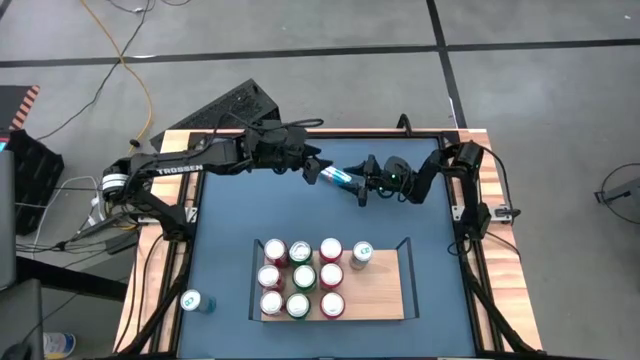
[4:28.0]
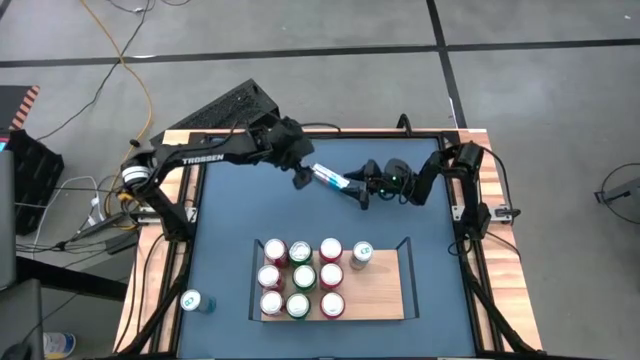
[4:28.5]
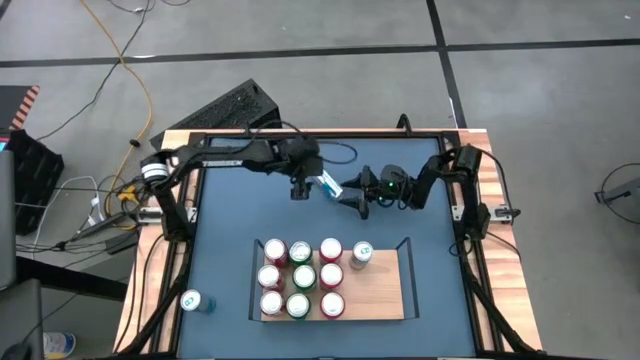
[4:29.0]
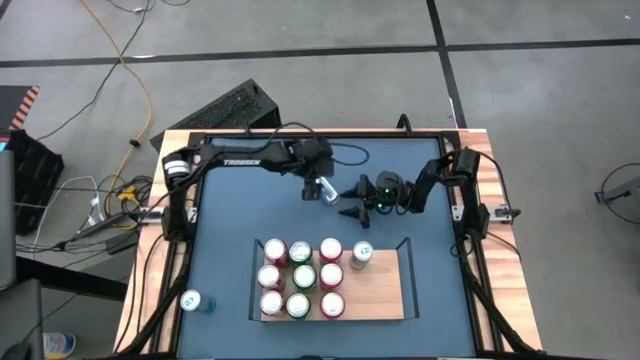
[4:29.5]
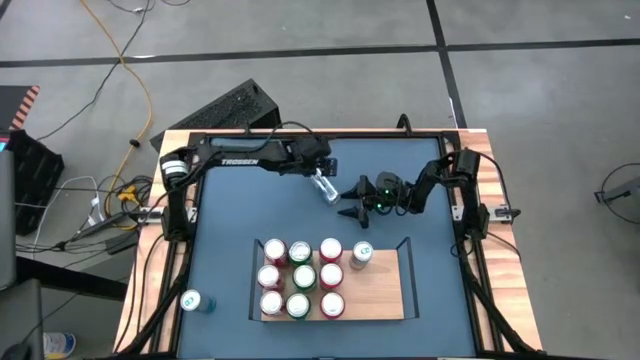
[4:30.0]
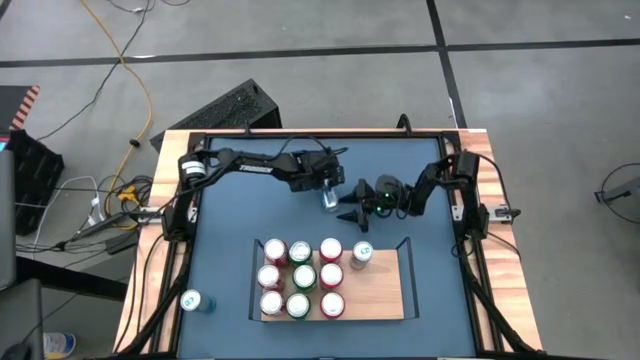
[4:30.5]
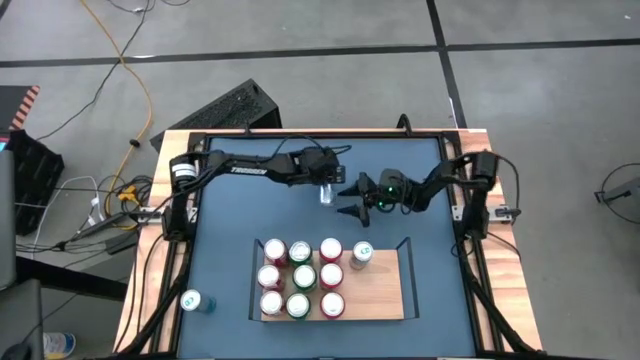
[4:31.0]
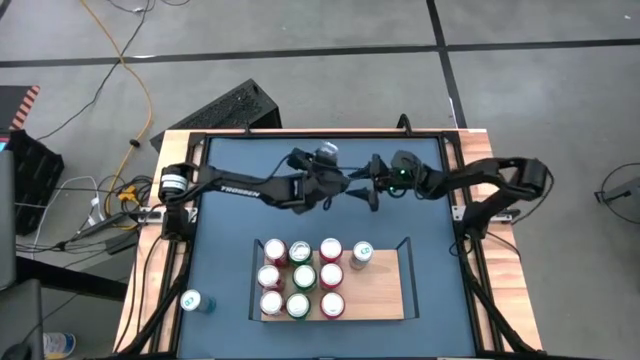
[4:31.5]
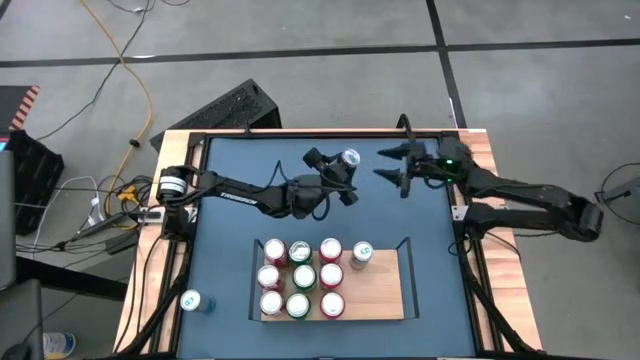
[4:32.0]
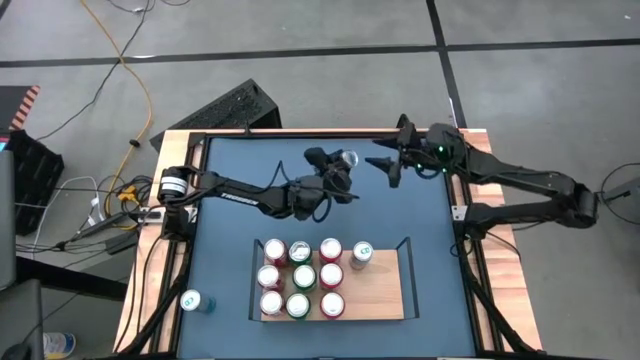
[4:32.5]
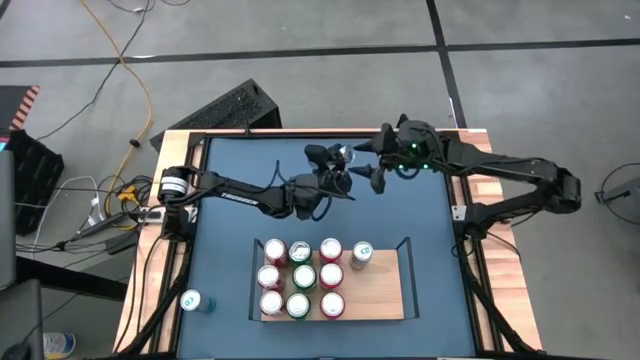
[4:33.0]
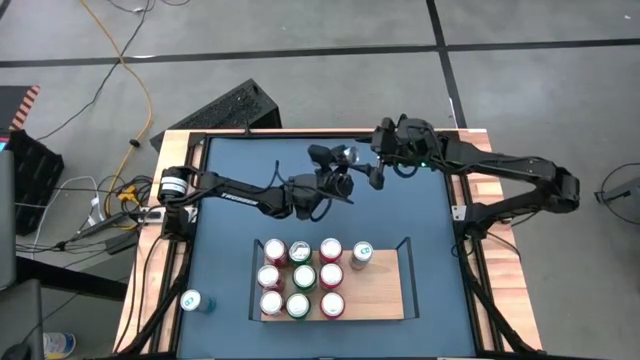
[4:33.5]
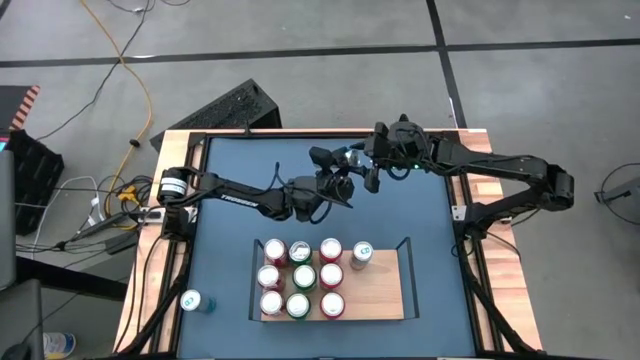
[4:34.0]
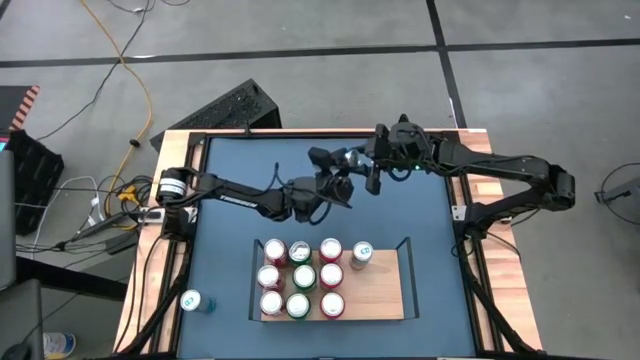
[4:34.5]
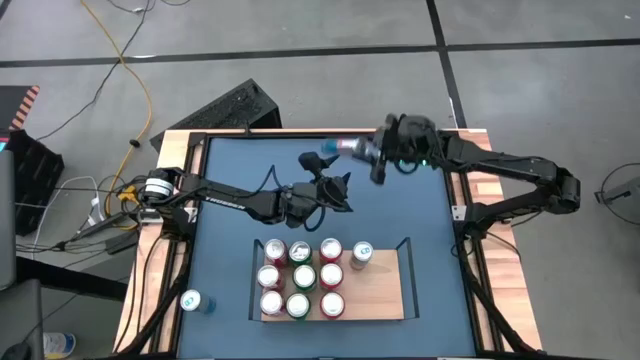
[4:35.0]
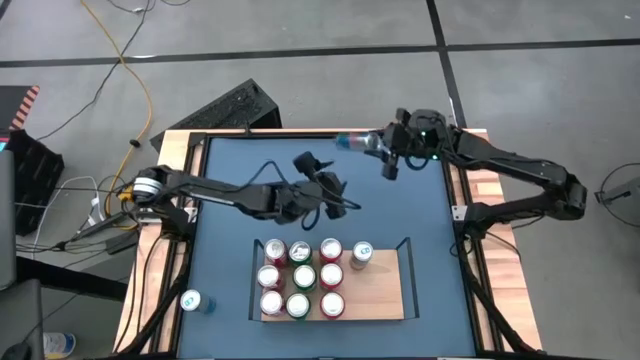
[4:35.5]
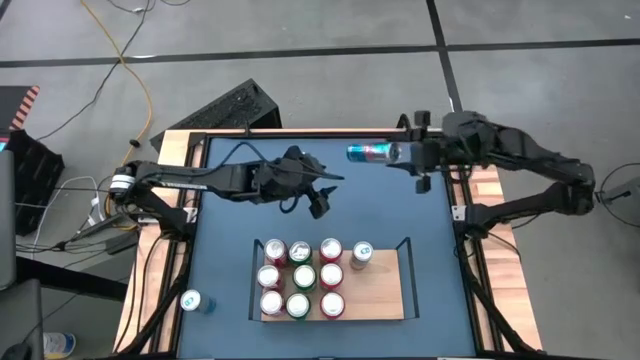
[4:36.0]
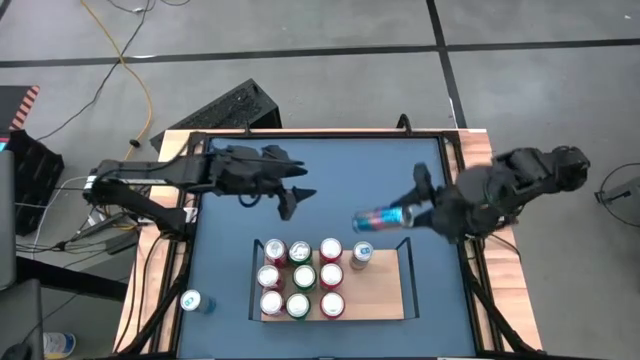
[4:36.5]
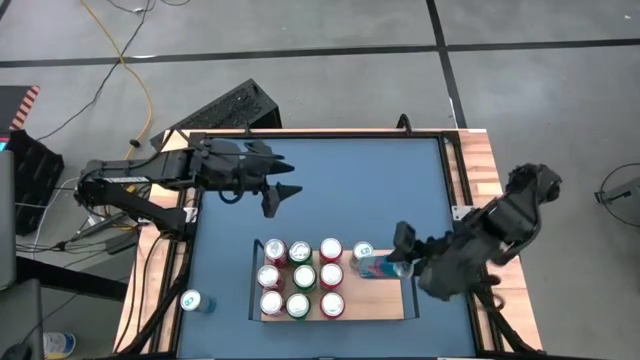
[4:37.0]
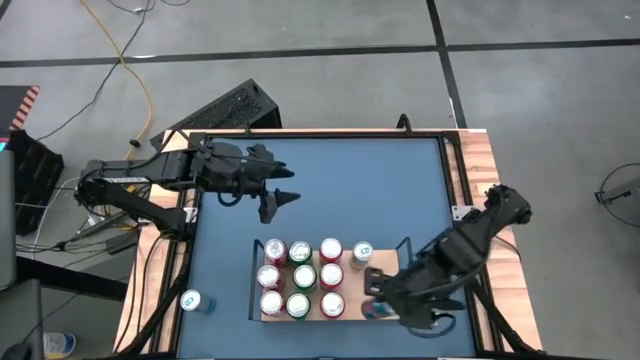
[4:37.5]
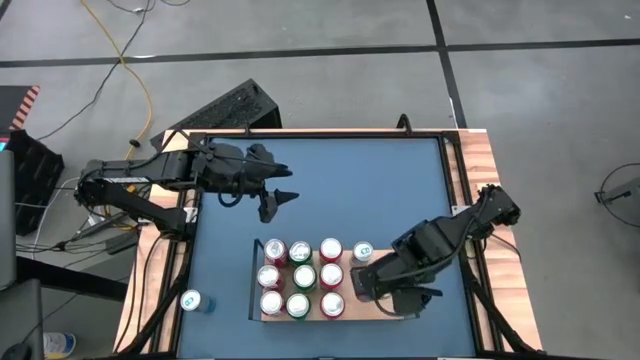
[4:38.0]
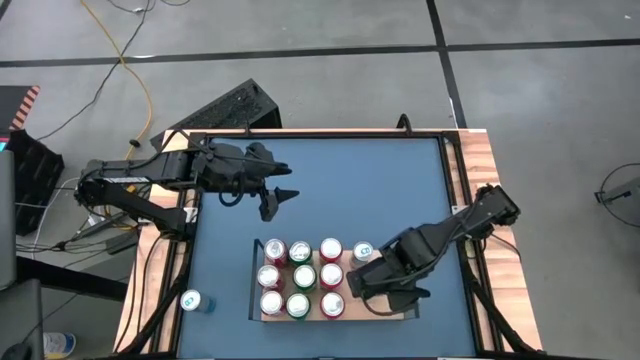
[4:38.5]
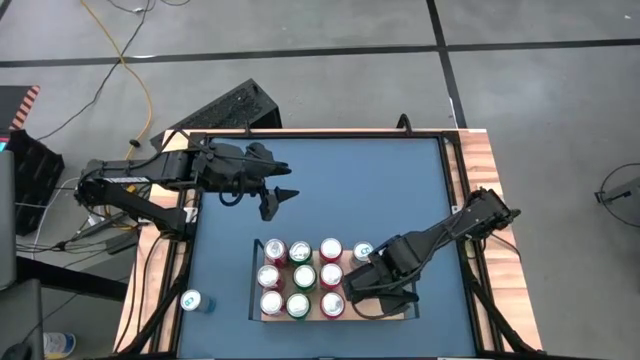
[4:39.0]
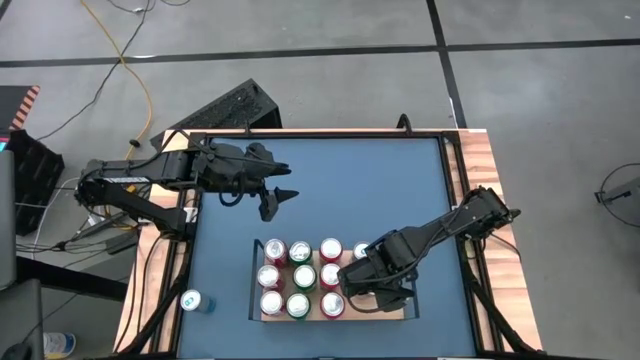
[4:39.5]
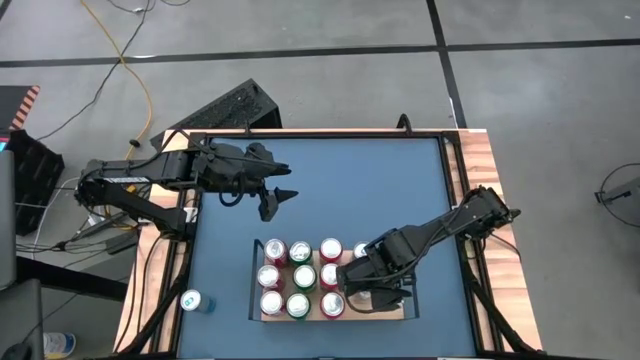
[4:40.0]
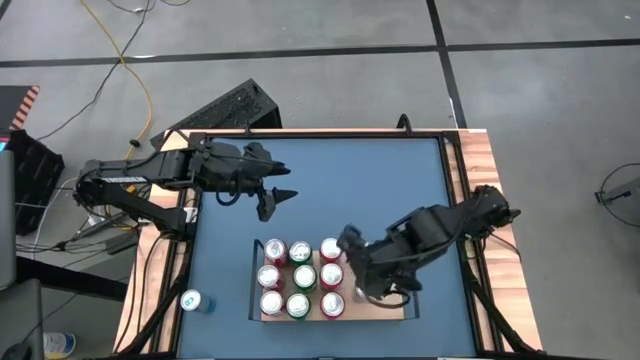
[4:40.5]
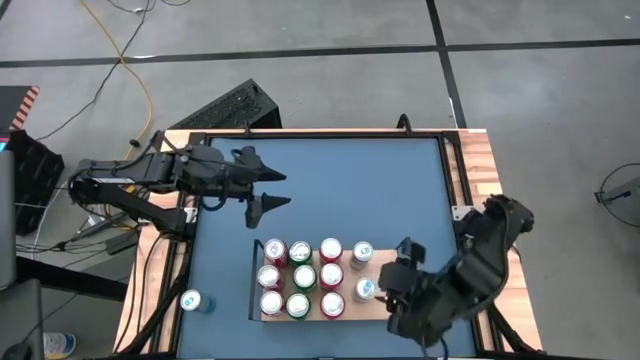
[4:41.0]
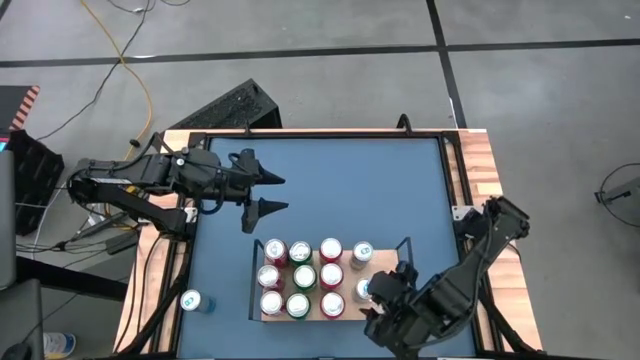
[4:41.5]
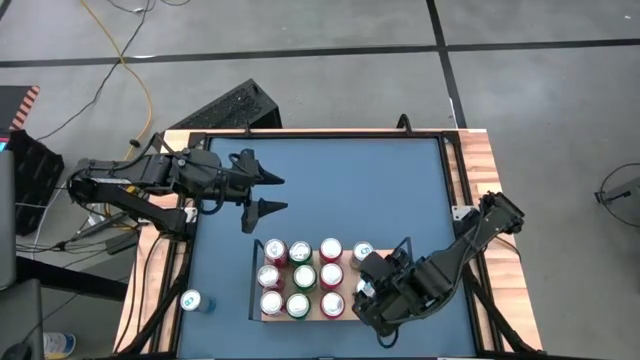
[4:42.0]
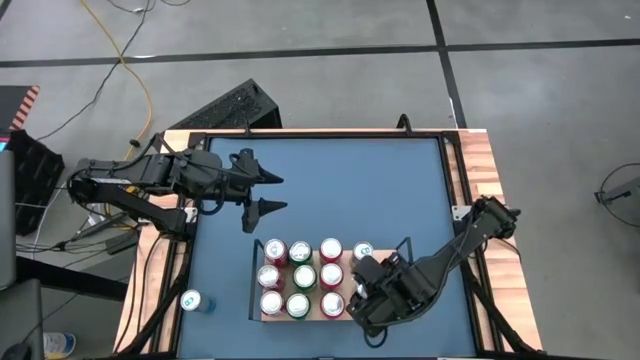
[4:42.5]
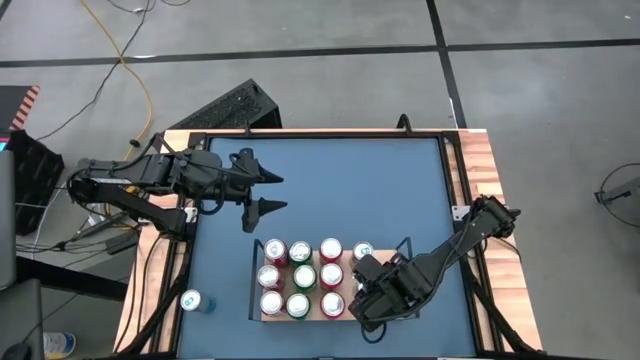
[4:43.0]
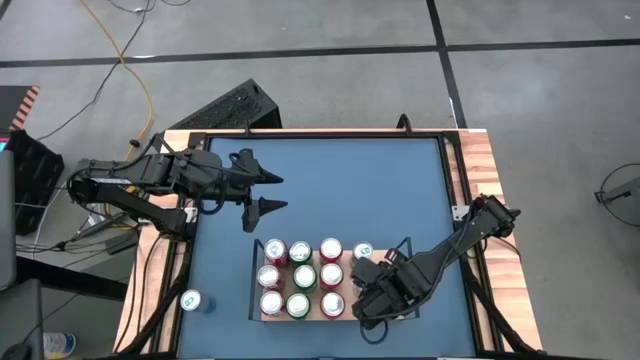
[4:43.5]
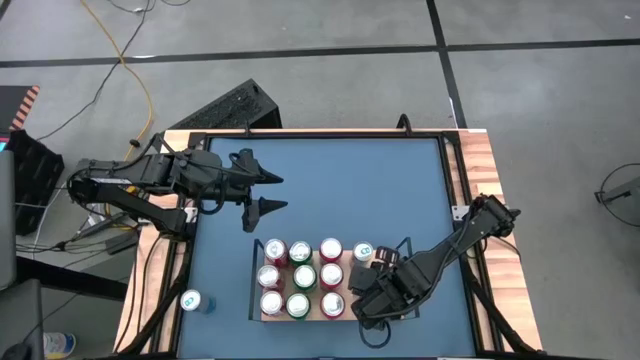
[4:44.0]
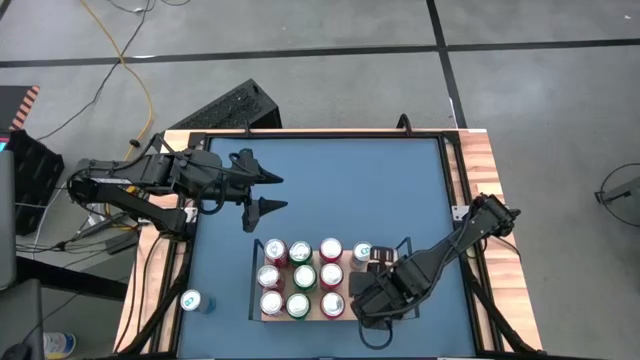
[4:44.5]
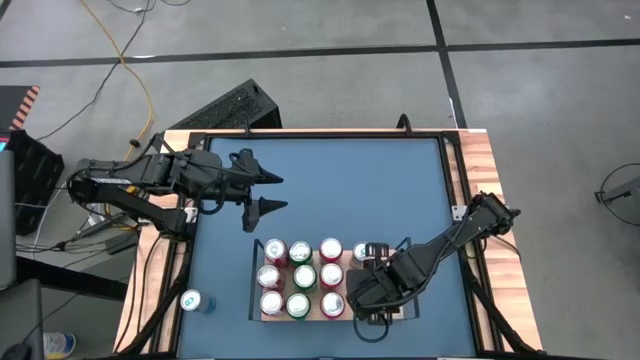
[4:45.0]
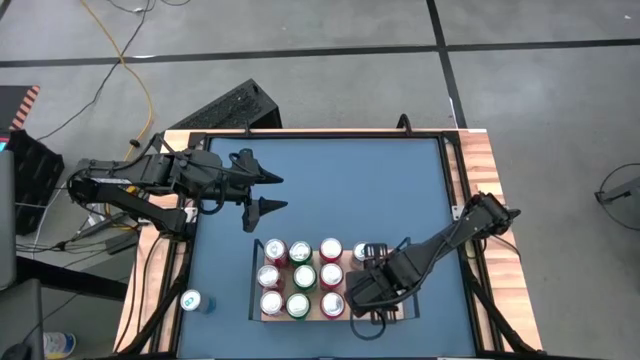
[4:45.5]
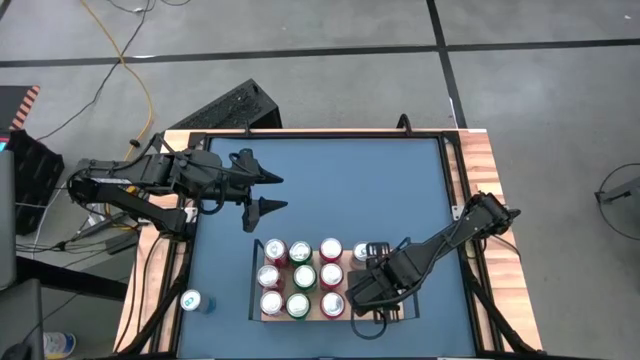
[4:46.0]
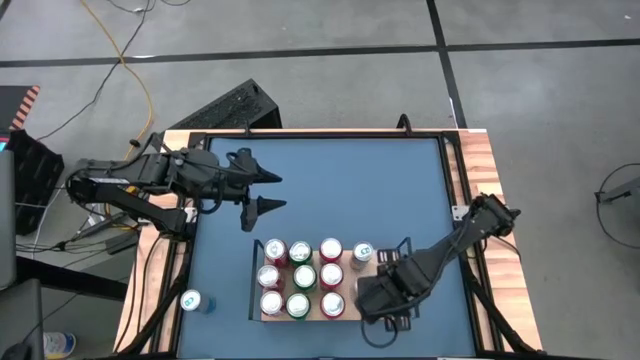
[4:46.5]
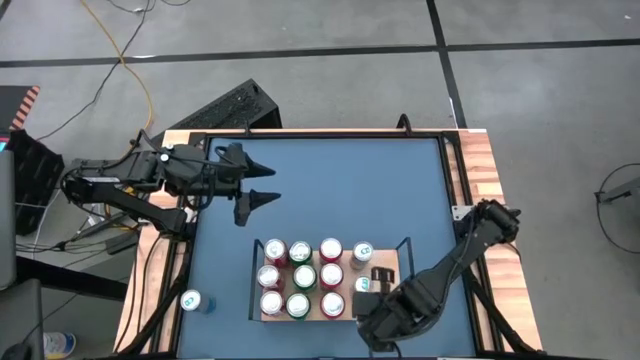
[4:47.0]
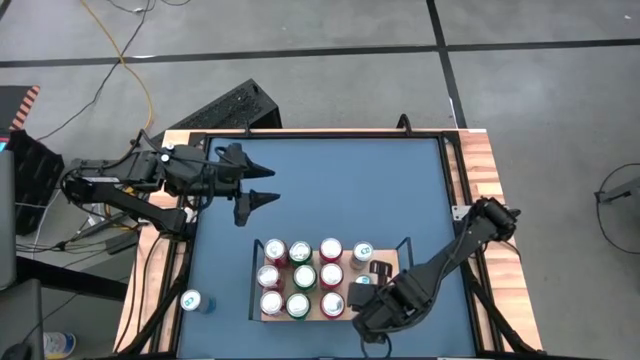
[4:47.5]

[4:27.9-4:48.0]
Task: Place canned beverage on shelf
Put the top blue soda can on the shelf aligned with the other blue soda can

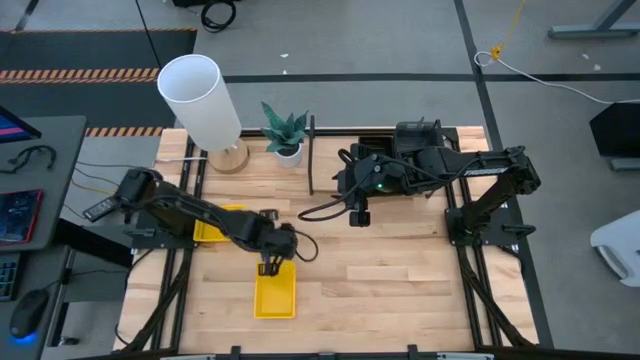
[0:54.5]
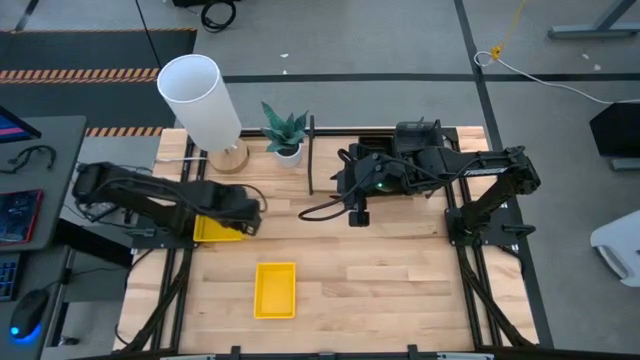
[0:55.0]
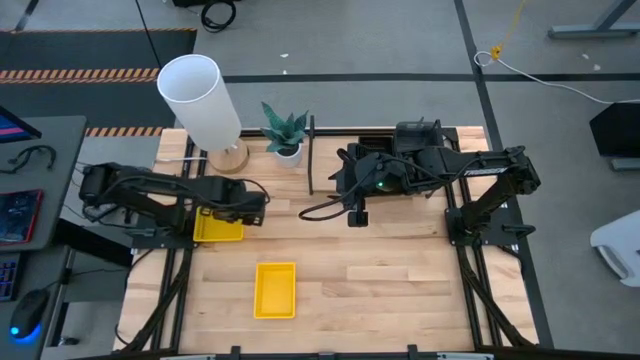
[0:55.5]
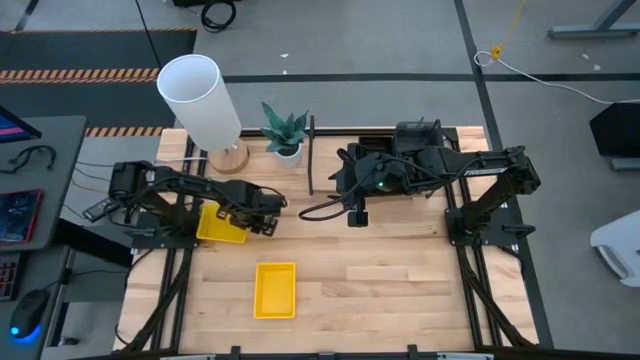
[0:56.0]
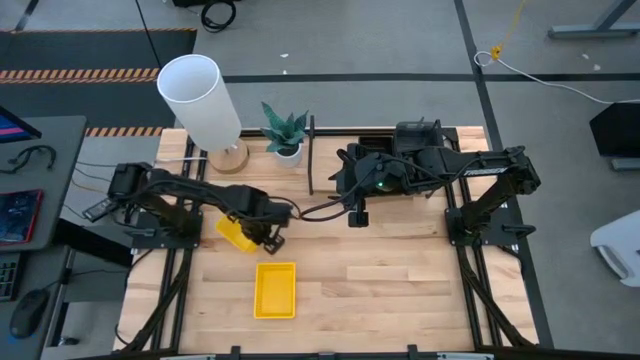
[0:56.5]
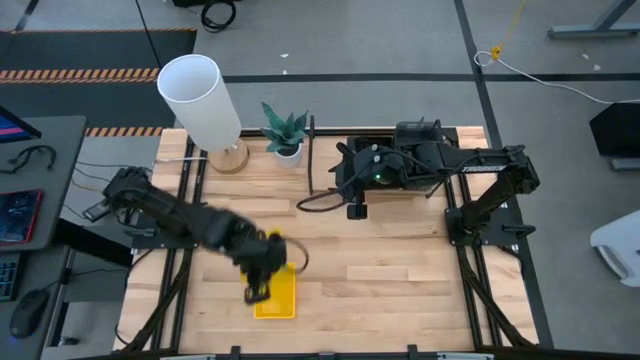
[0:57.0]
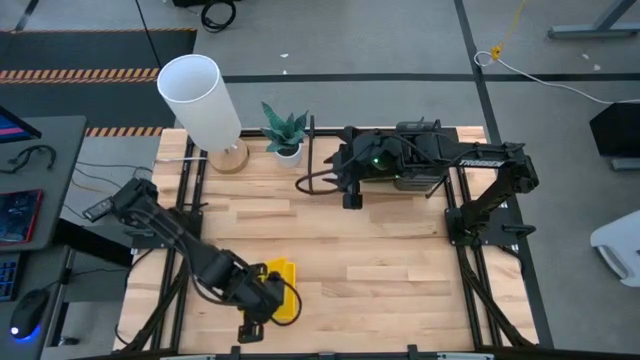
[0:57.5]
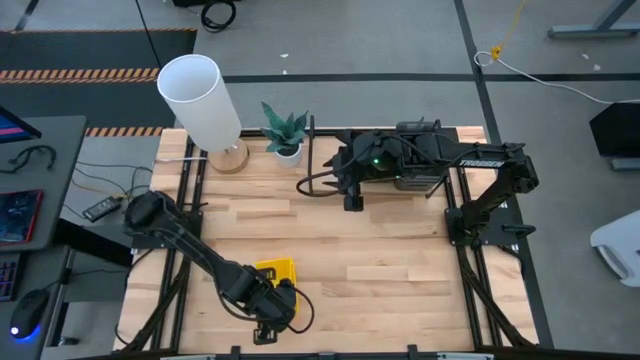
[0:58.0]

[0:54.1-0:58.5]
Task: Stack baskets on shelf by color
Stack the yellow bin on top of the other yellow bins
